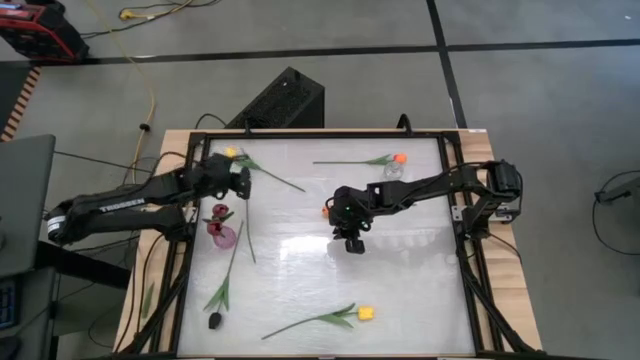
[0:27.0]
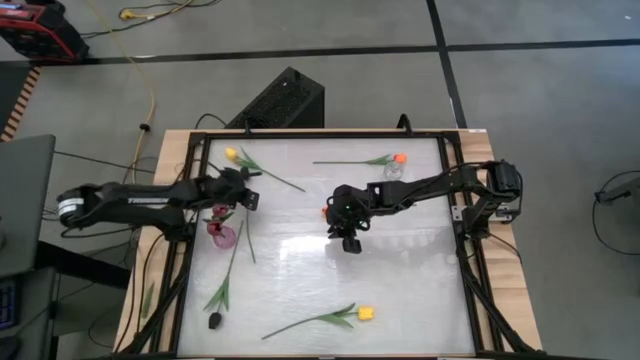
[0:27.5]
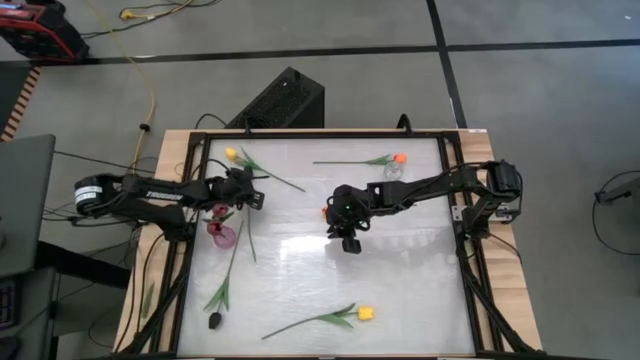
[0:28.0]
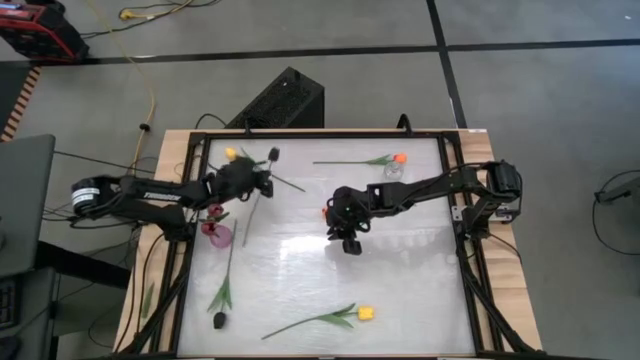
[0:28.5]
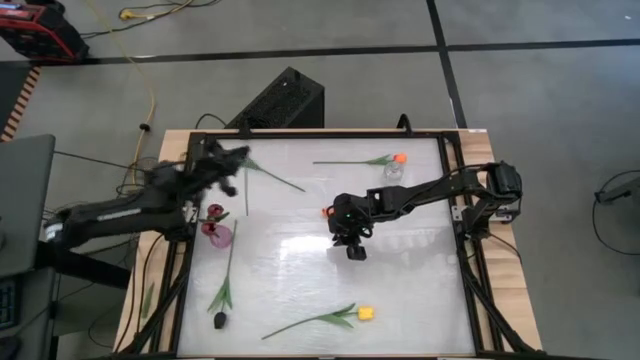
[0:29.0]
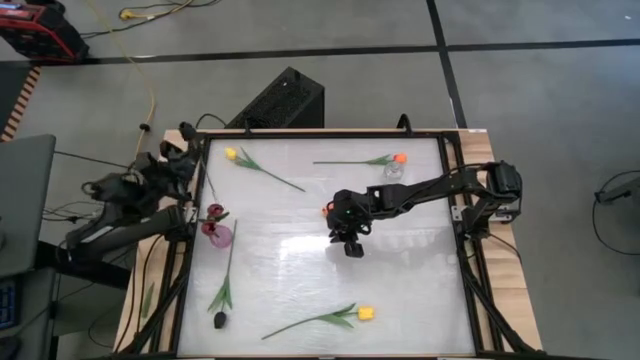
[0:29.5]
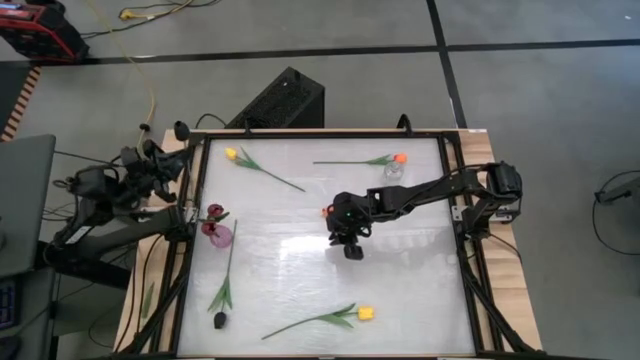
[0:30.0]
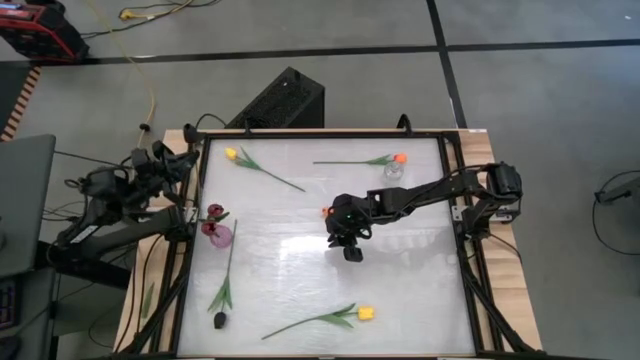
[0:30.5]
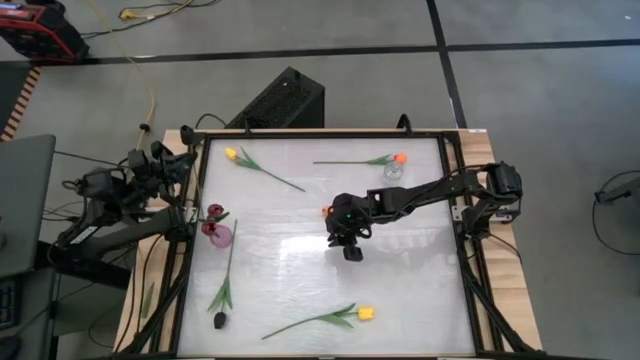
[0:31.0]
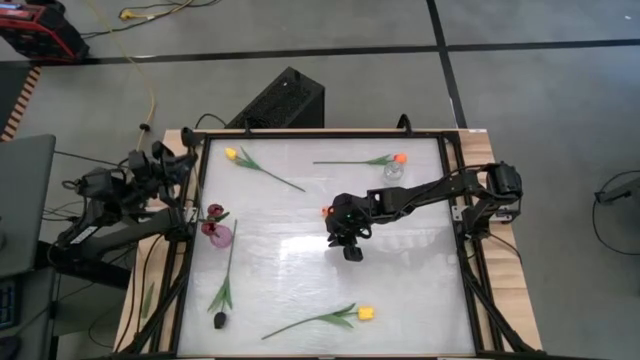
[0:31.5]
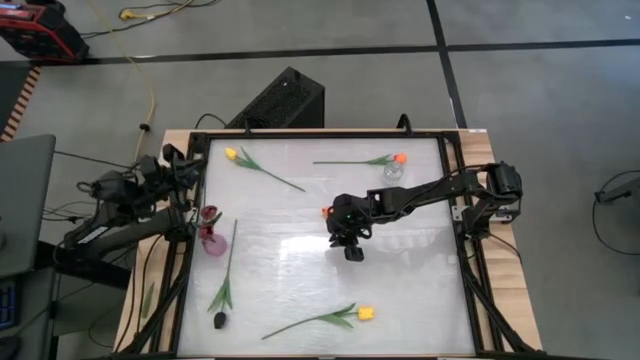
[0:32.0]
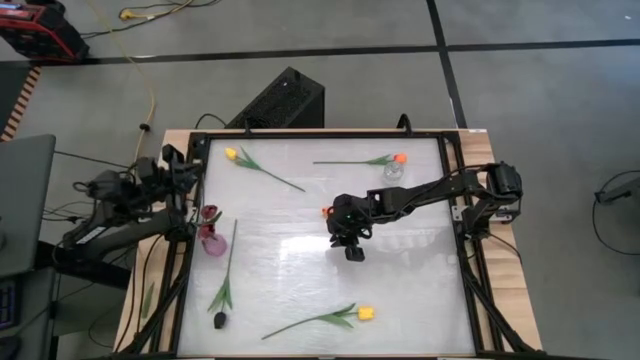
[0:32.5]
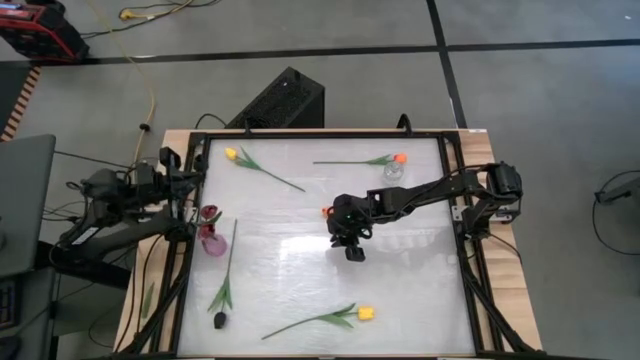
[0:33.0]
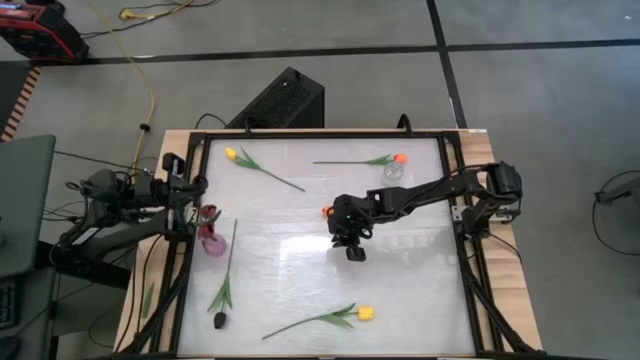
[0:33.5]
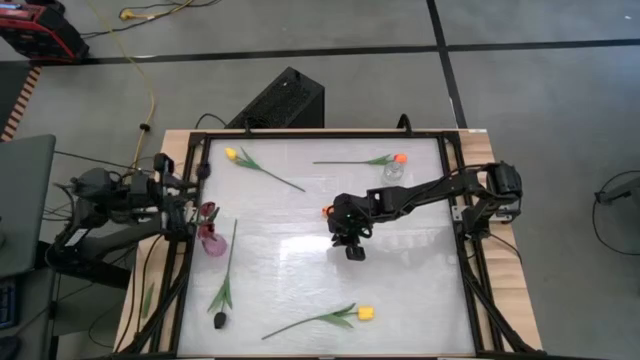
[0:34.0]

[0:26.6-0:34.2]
Task: Sort flowers into vase by color
Put the top black tulip into the pink vase

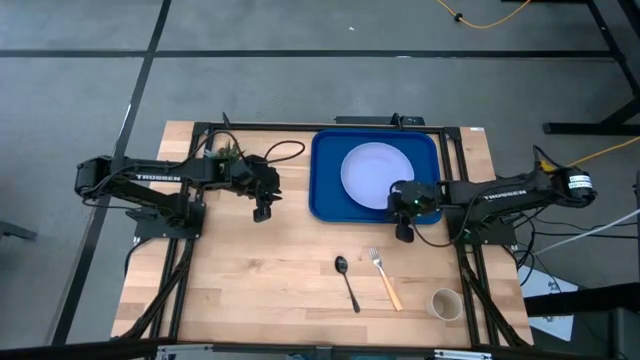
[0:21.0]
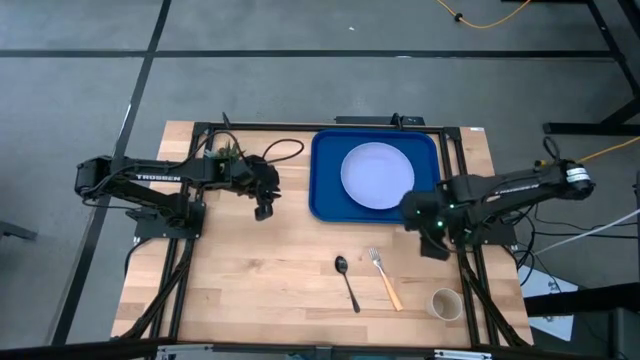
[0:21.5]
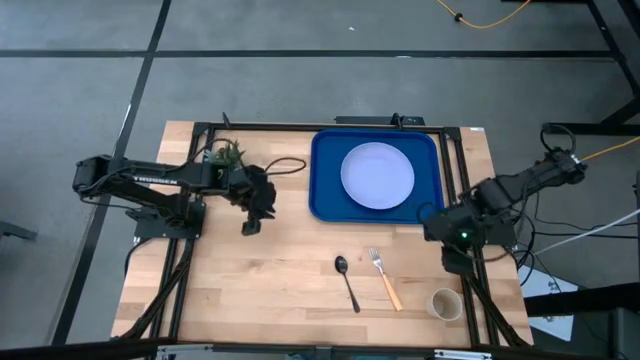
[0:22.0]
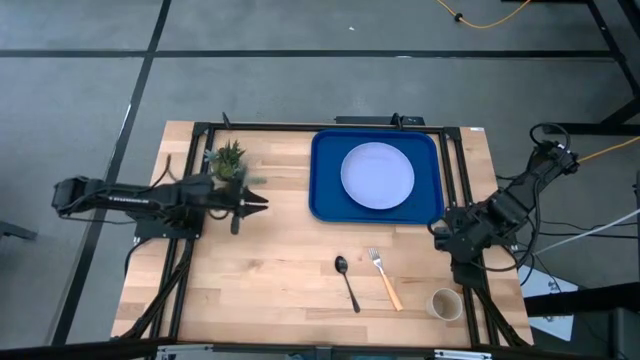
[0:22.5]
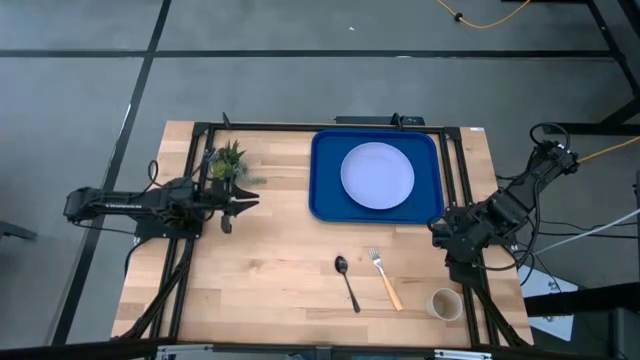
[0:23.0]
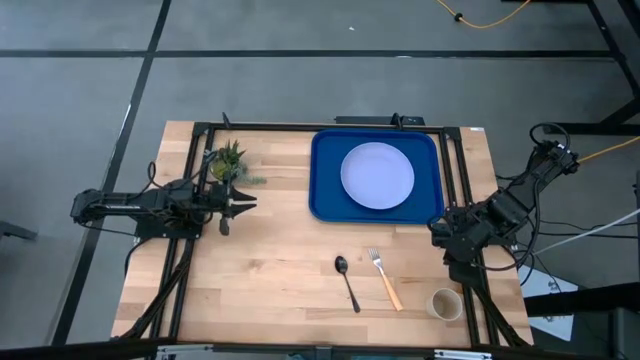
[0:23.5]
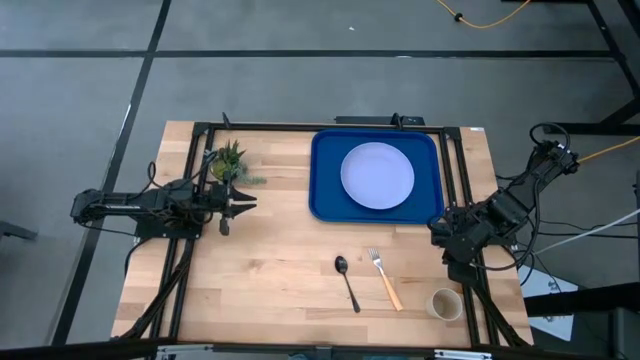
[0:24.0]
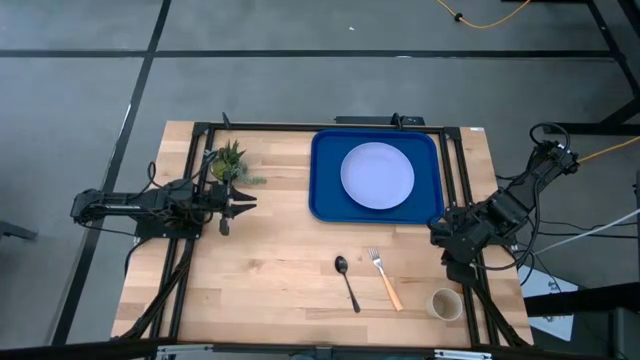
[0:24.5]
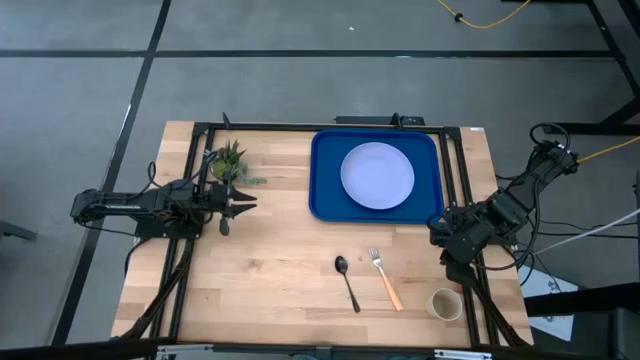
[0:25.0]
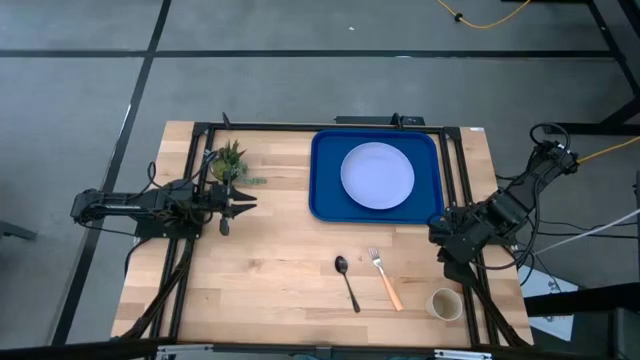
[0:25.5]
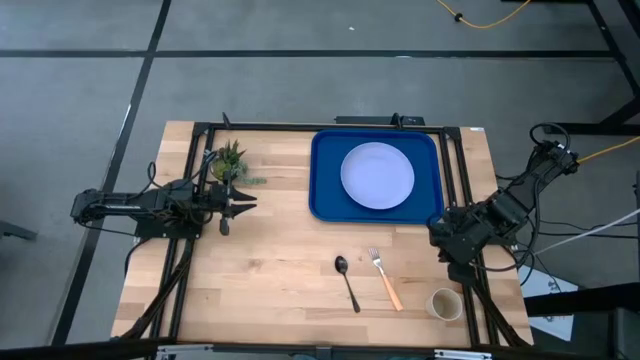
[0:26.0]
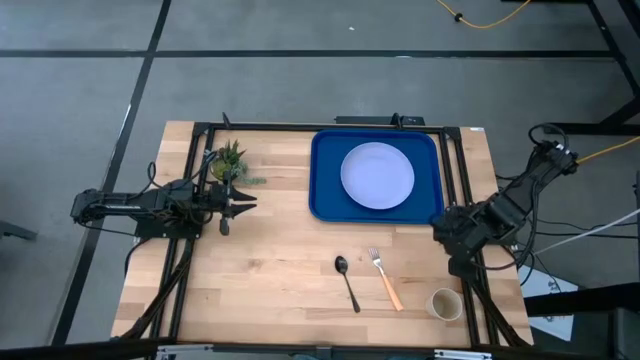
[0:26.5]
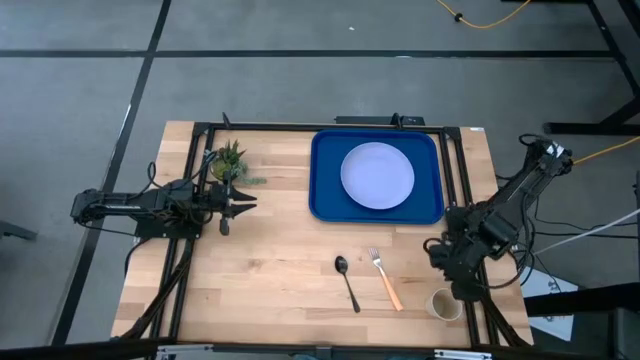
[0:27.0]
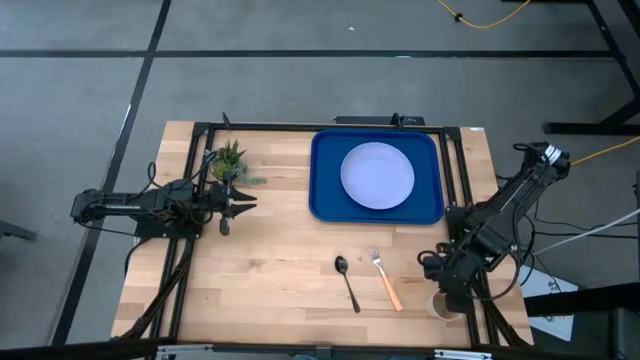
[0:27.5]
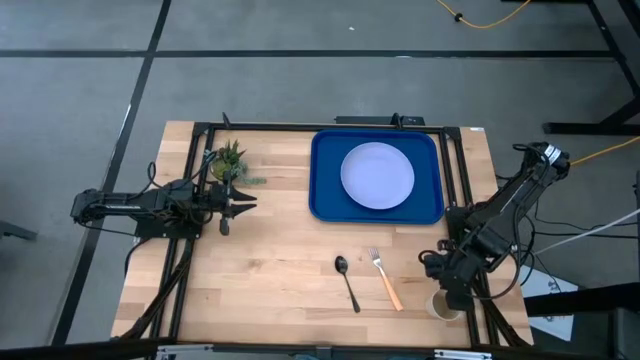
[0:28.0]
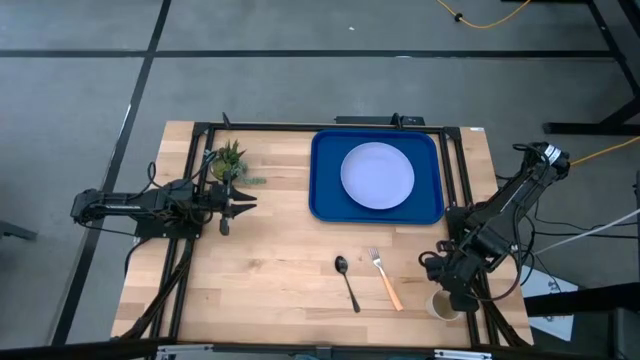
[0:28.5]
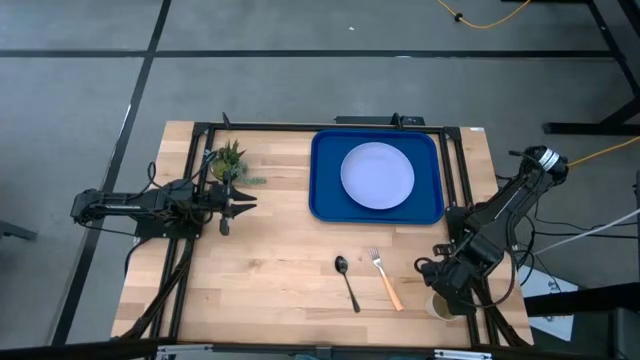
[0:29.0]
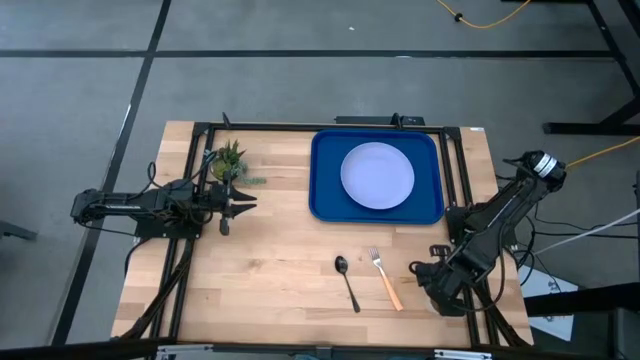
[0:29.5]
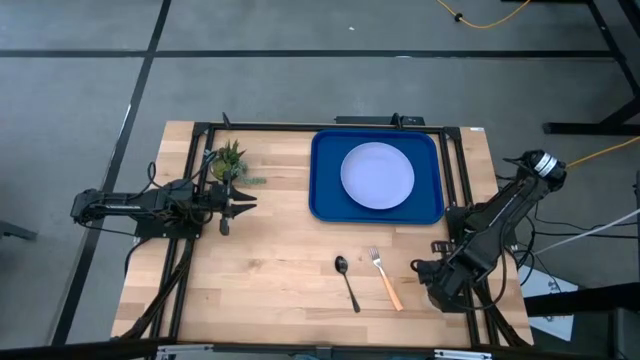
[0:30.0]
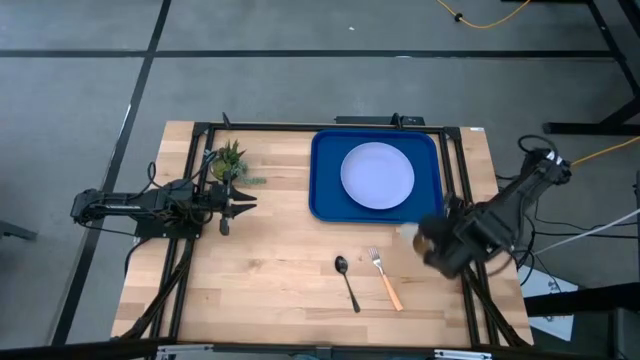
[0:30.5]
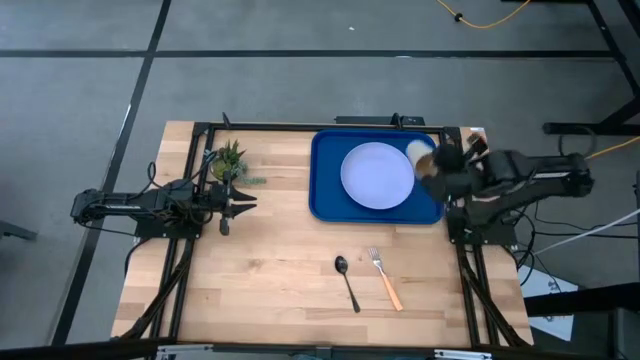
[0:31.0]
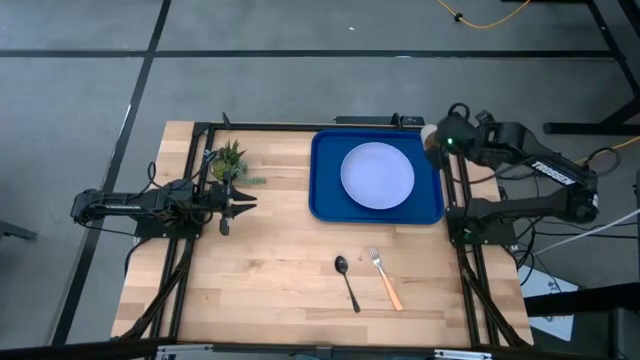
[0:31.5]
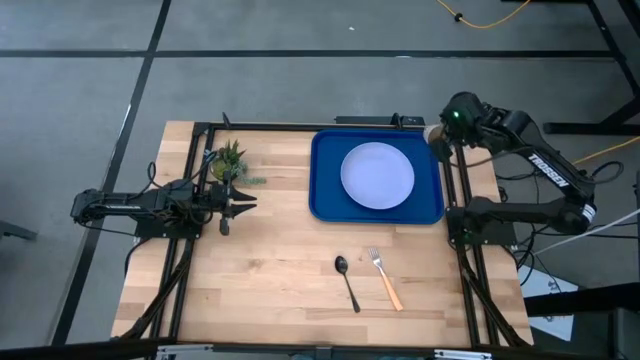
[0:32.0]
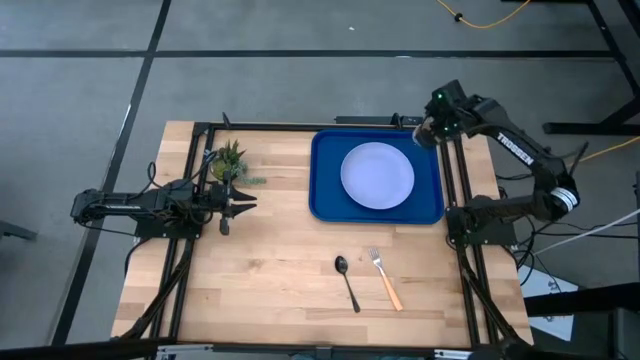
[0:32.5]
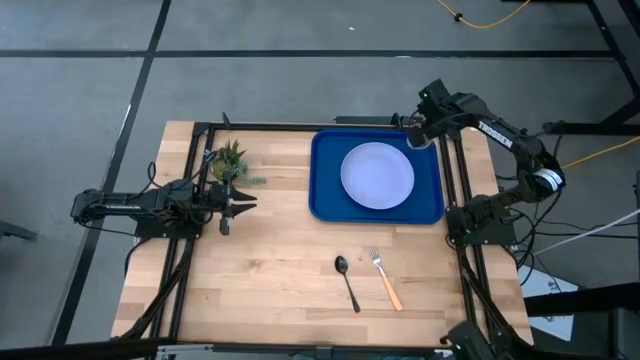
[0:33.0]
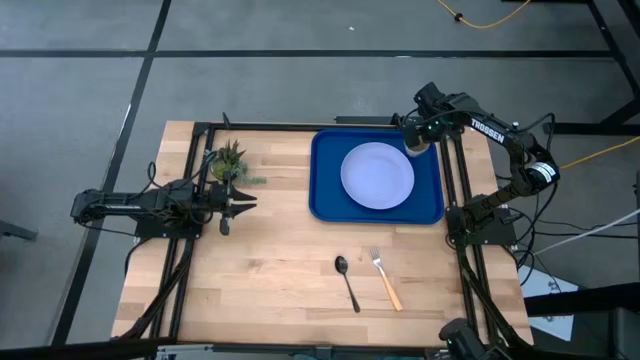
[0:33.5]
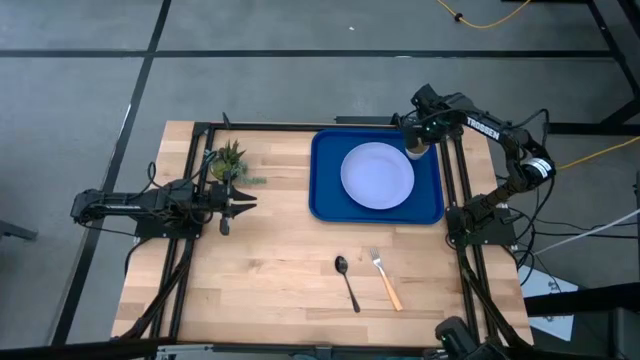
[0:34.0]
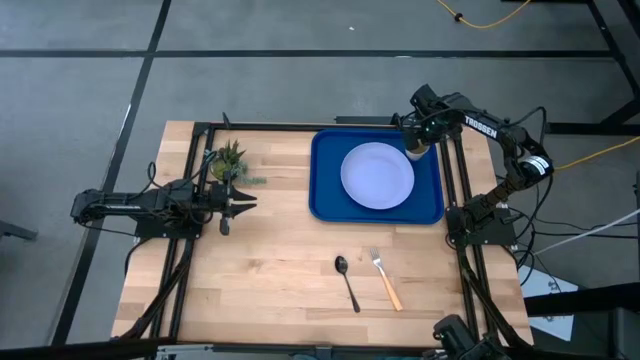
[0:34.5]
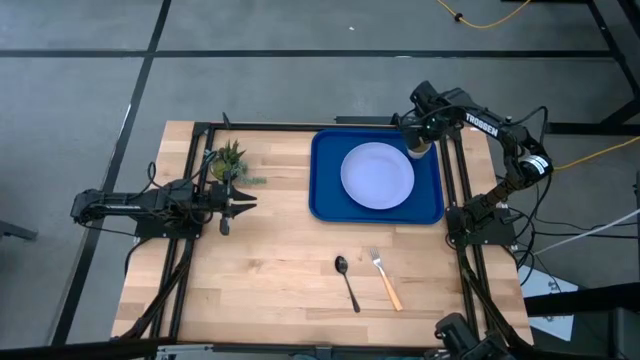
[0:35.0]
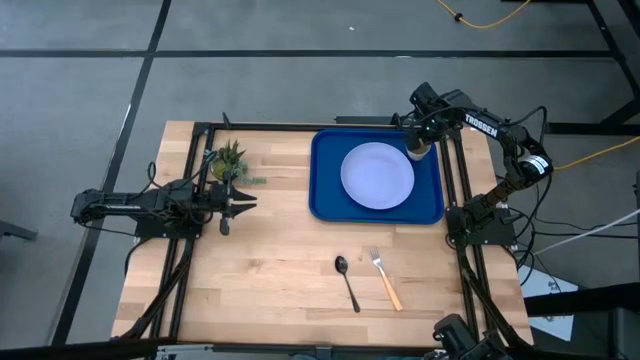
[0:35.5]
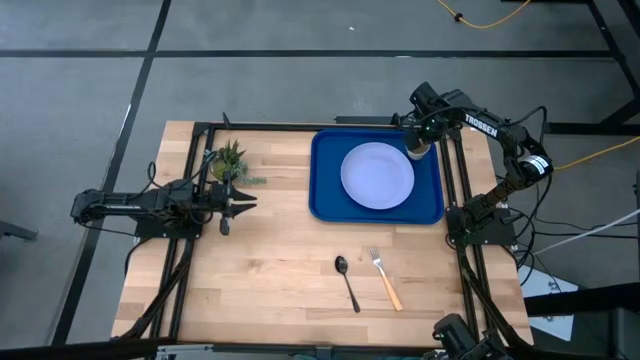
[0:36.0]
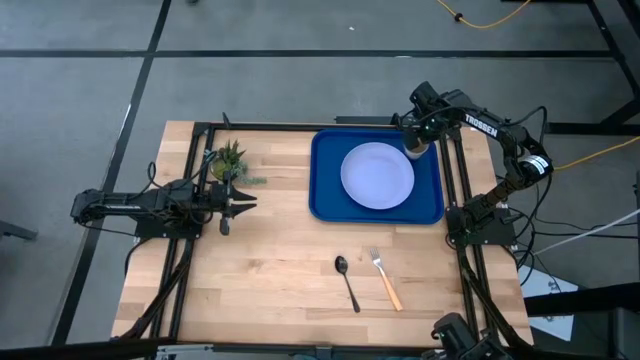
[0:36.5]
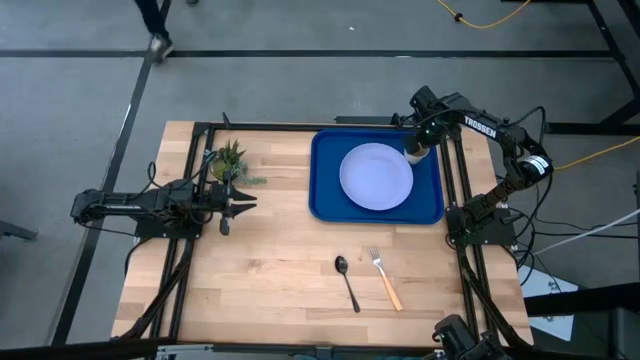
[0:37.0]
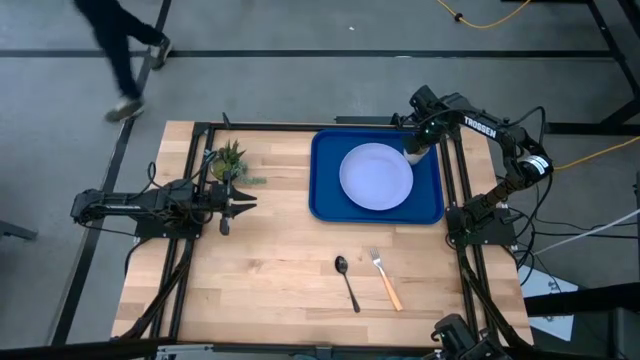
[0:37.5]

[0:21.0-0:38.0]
Task: Pick and place plate/cup/fork/spoon on tray
Put the gray cup to the top right of the purple plate on the blue serving tray
